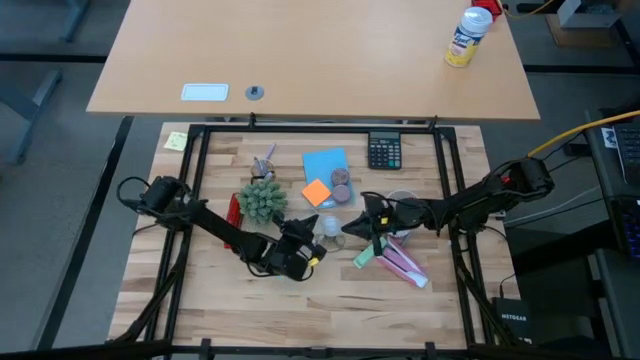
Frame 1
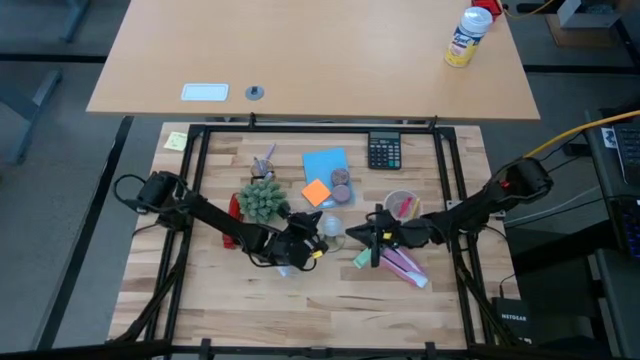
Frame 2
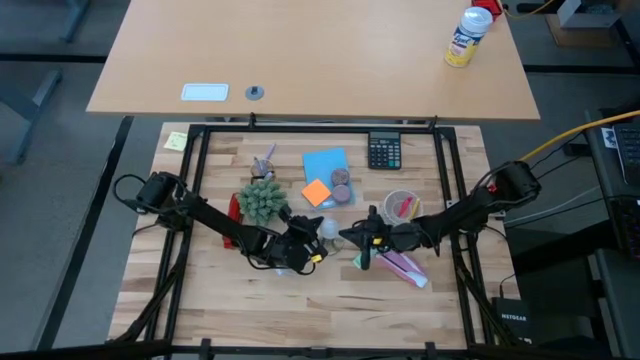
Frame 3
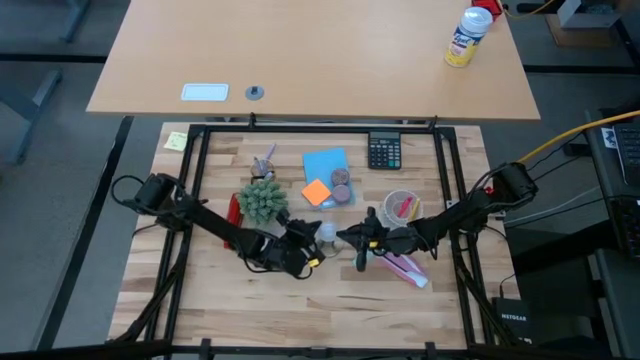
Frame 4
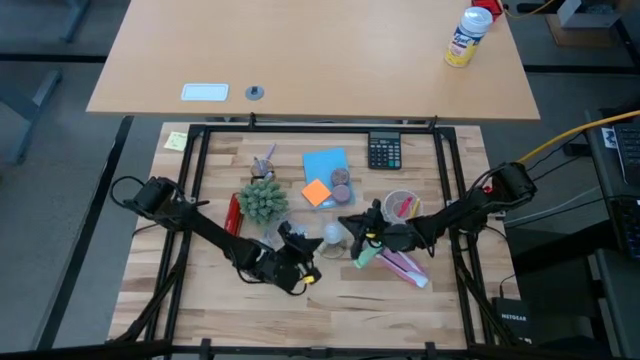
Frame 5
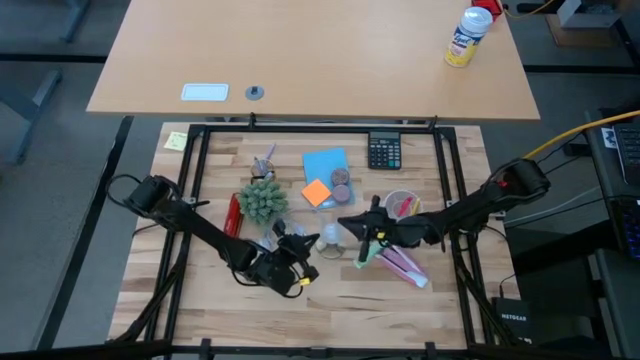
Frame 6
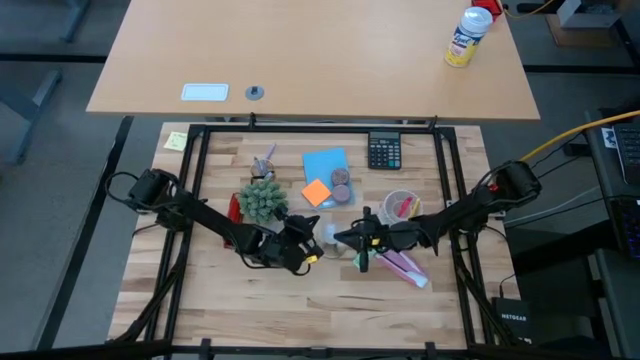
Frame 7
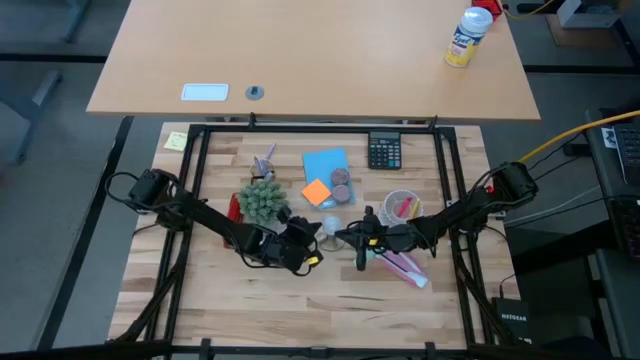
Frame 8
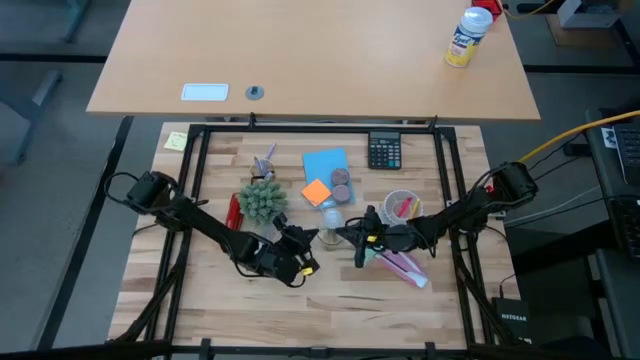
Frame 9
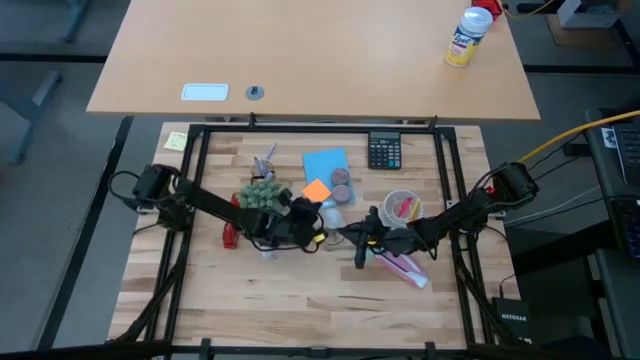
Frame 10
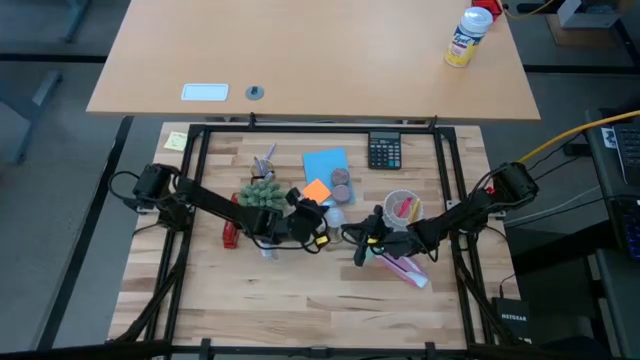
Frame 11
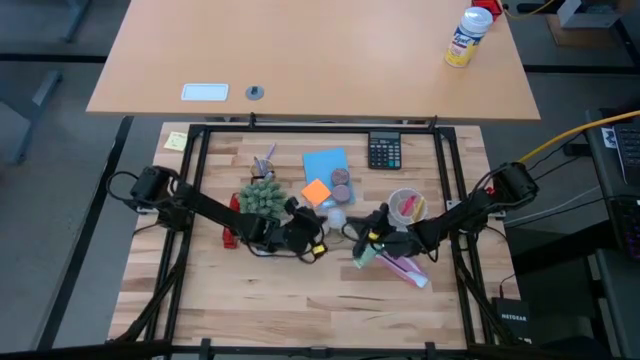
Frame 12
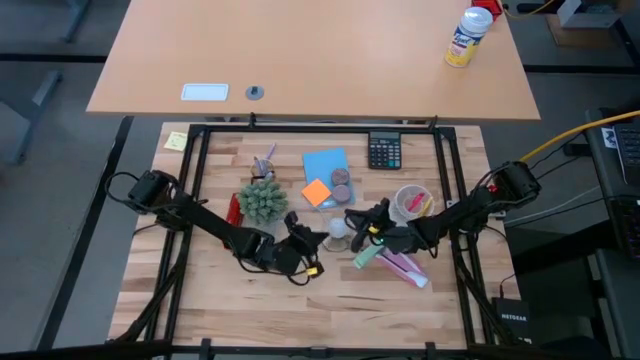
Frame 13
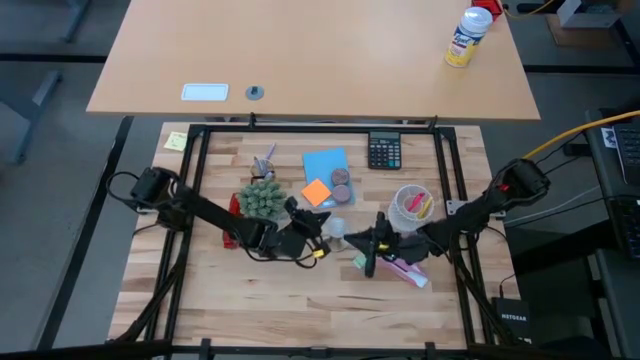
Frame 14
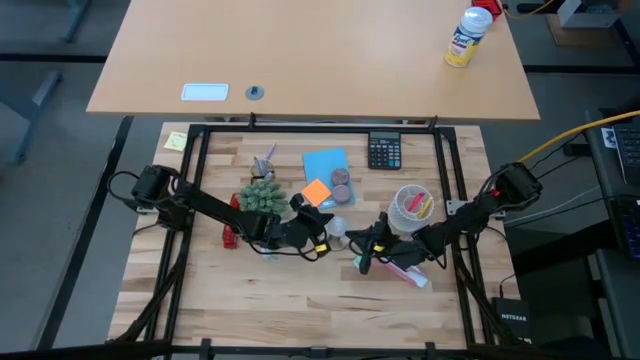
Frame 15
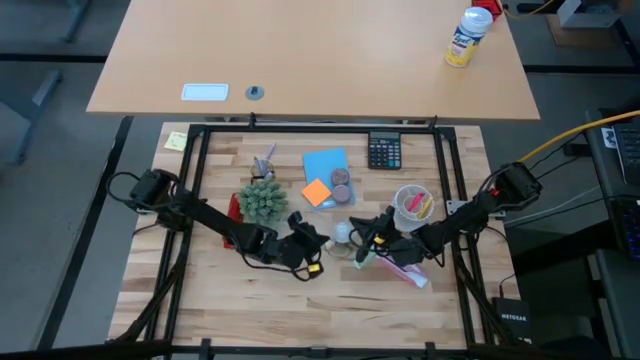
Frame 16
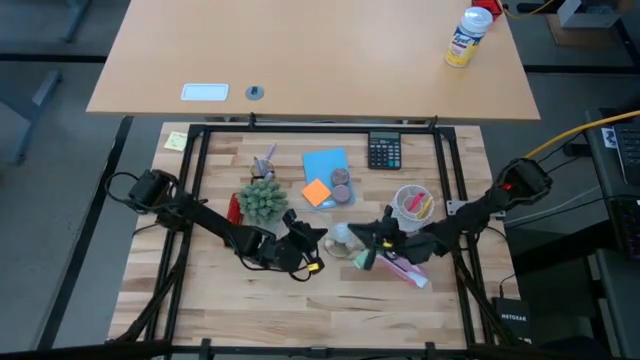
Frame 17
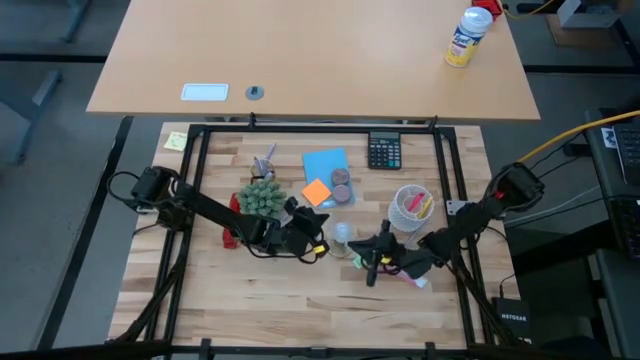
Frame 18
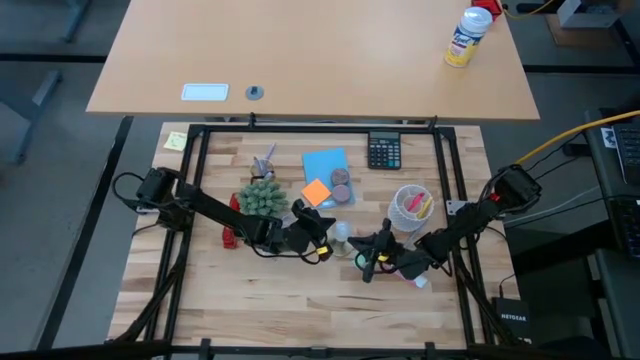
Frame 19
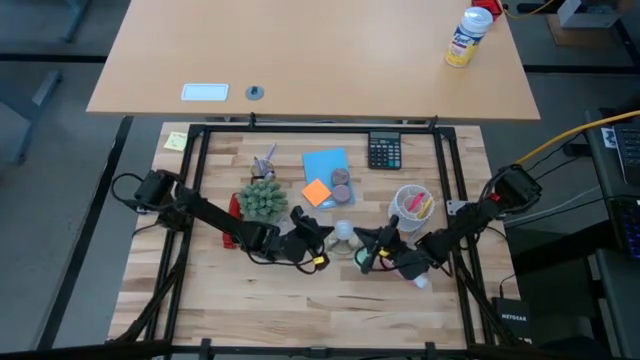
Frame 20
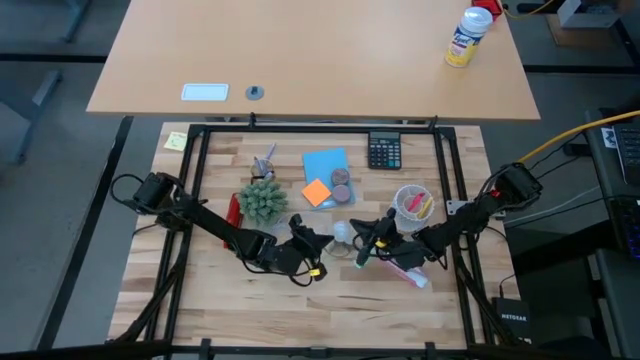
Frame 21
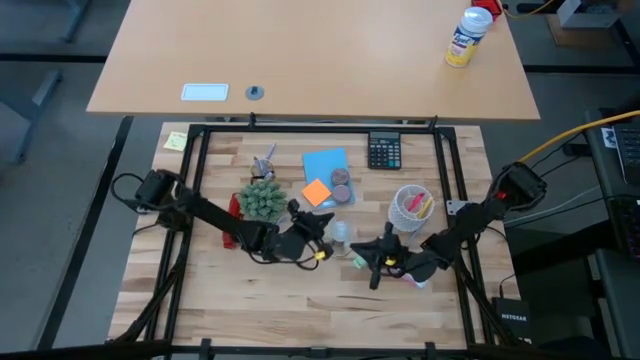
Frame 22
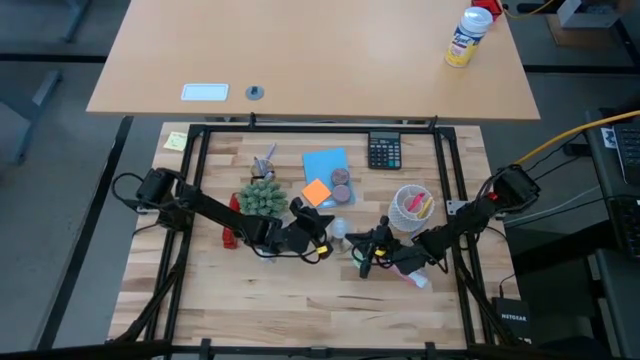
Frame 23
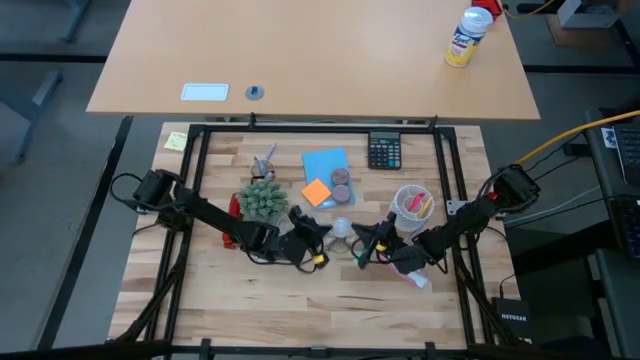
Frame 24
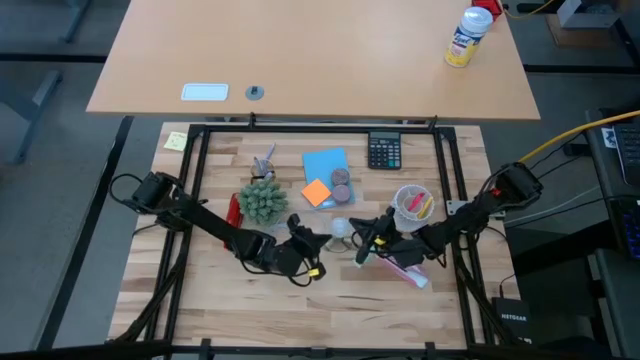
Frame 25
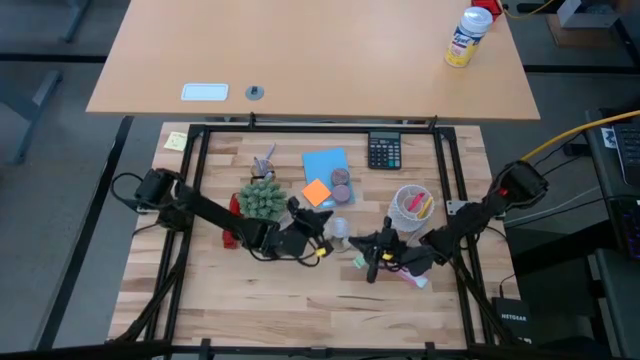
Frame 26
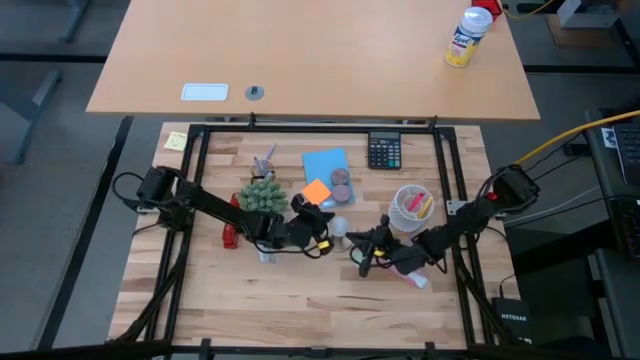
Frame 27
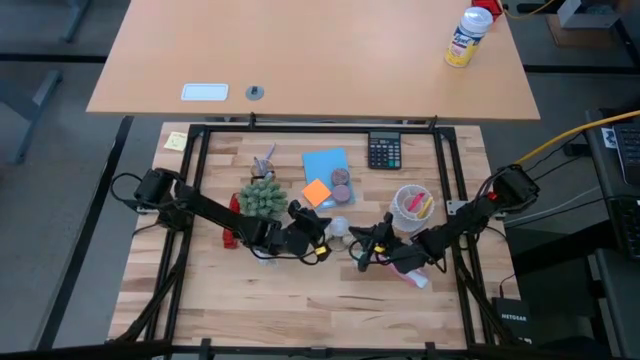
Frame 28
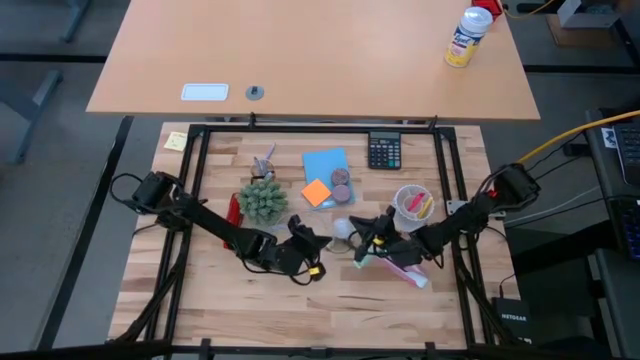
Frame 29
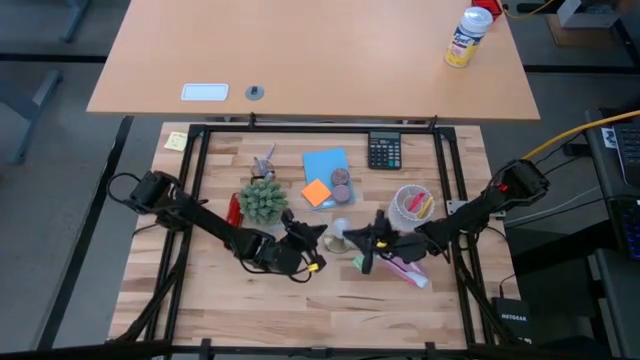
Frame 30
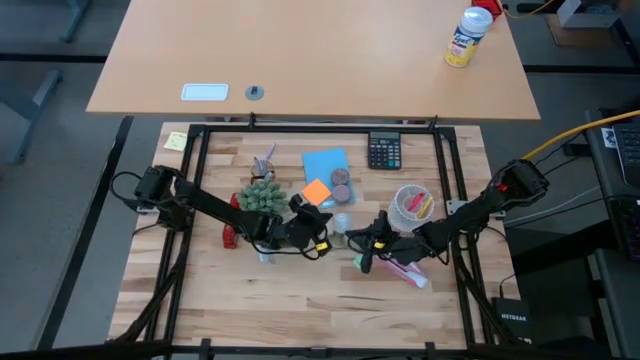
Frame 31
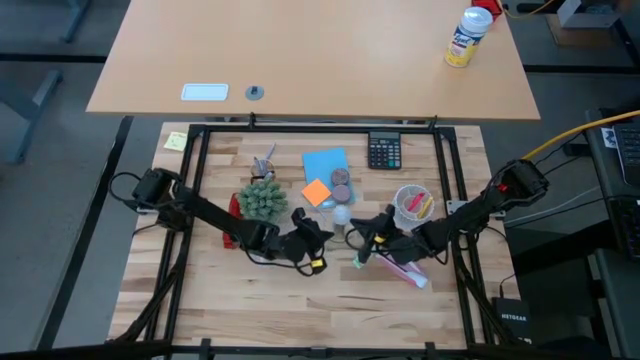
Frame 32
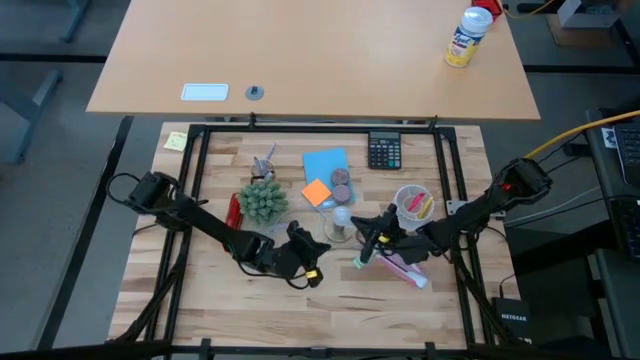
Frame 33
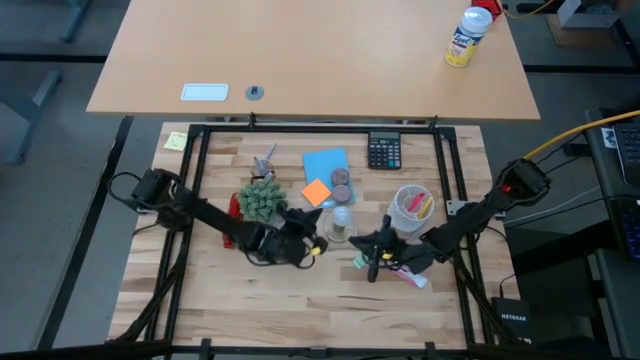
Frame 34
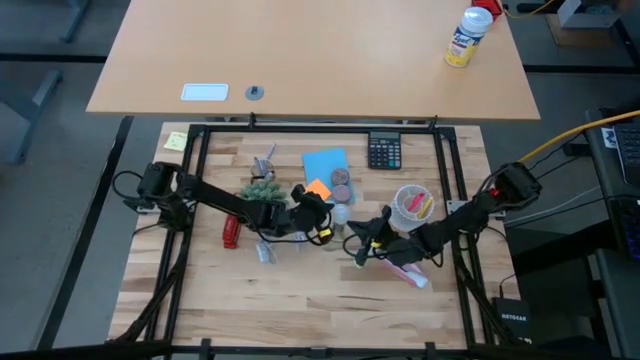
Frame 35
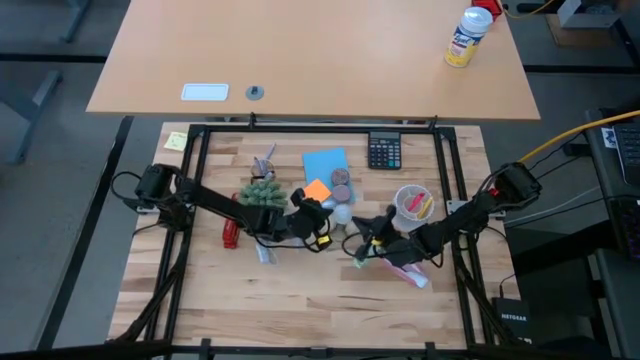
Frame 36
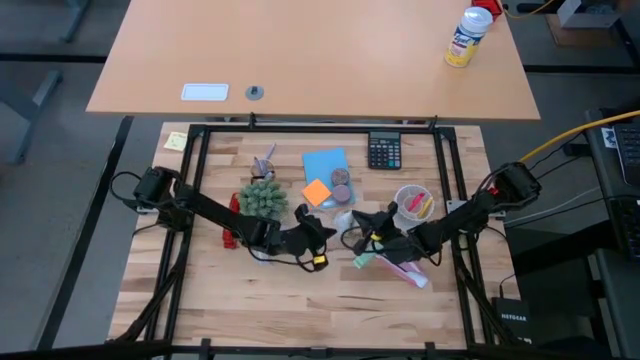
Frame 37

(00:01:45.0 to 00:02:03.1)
Task: Screw lightbulb
Remove the white lightbulb from the lamp socket

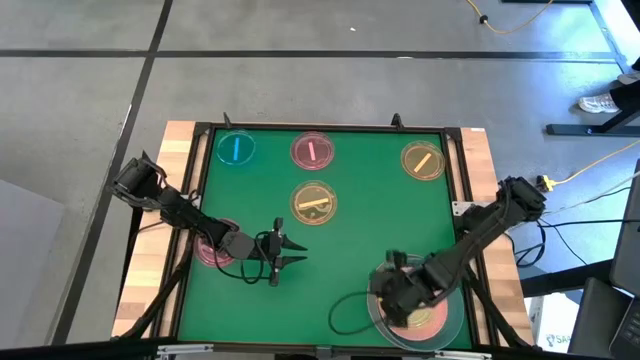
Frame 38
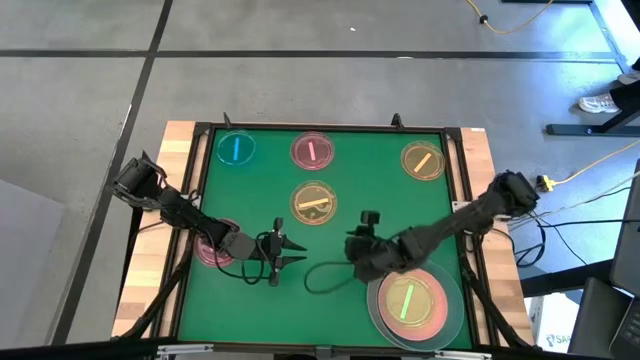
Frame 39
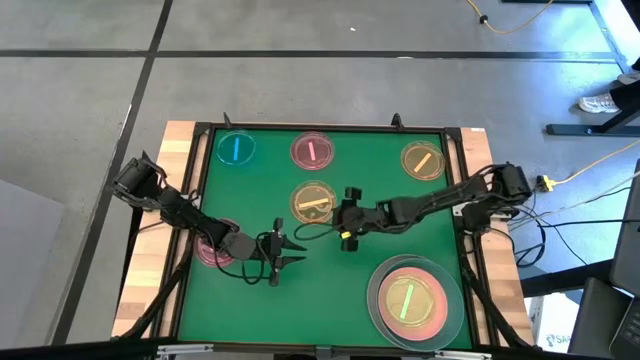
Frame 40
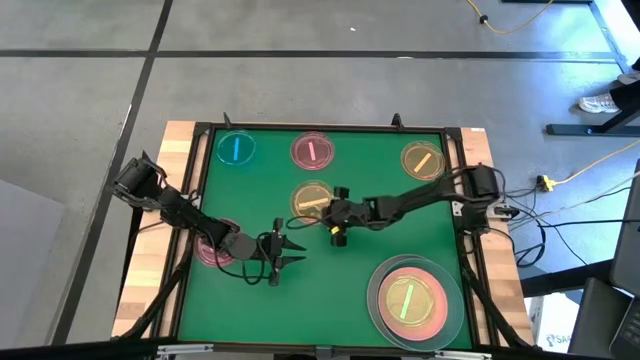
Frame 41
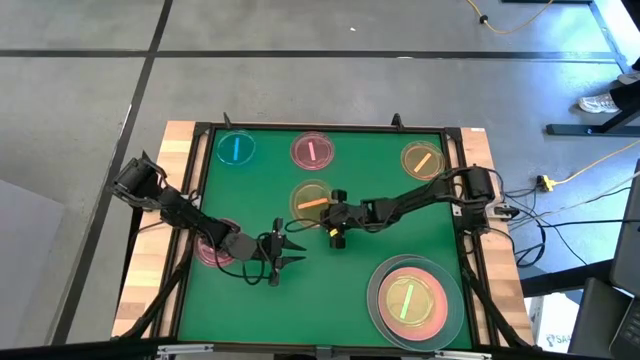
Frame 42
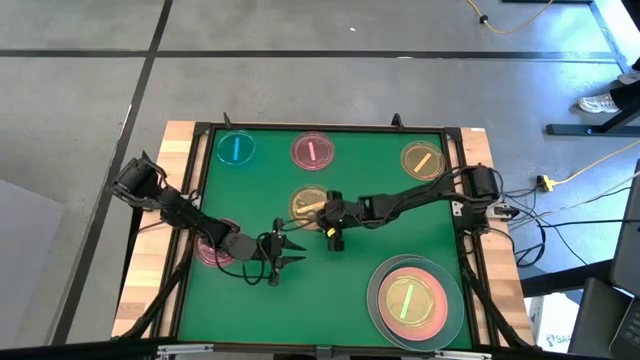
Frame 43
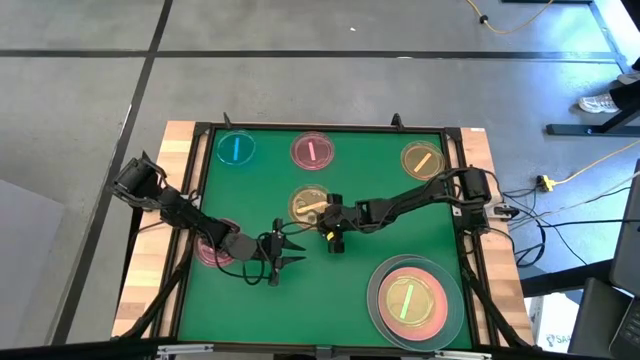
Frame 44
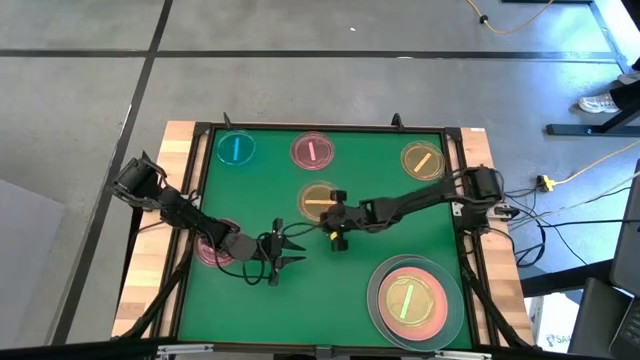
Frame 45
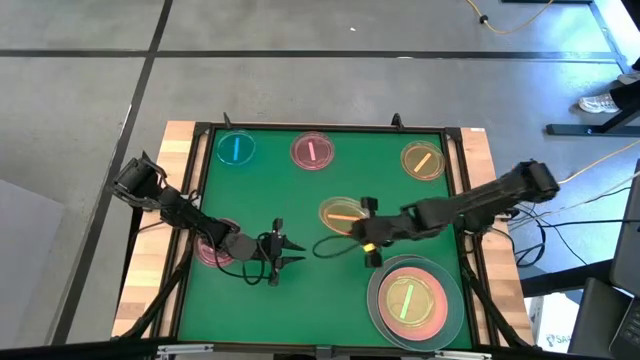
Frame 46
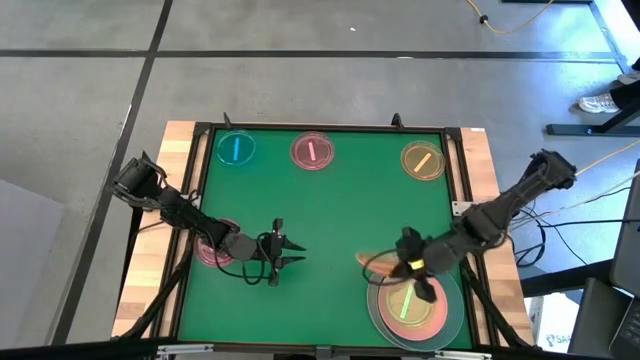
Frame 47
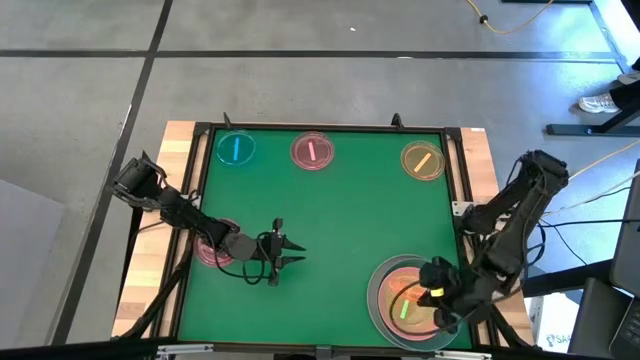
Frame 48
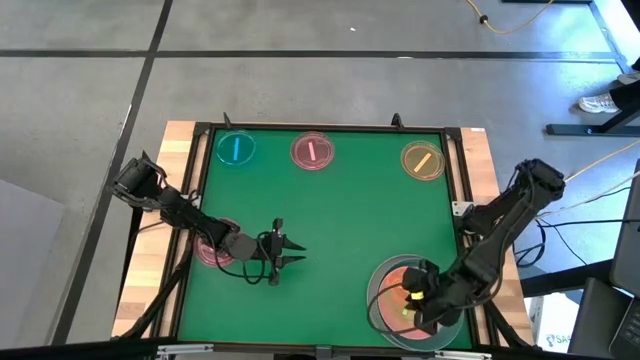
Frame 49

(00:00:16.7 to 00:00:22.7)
Task: Stack plastic plates
Stack the bottom transparent orange plate on top of the transparent green plate
